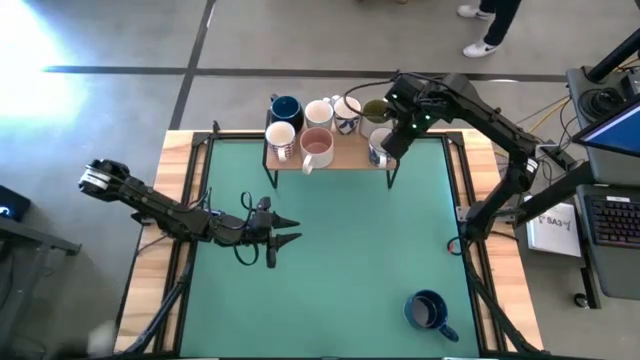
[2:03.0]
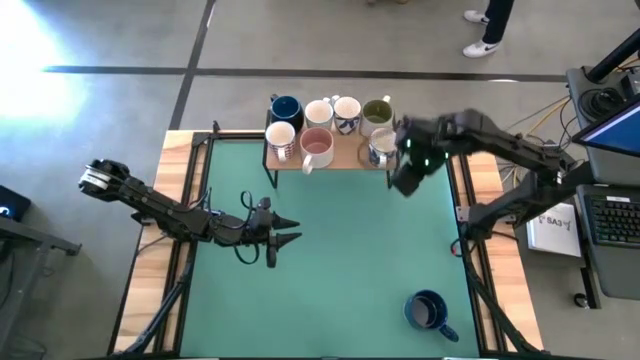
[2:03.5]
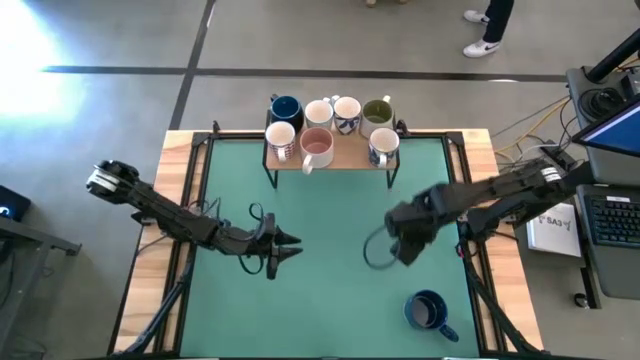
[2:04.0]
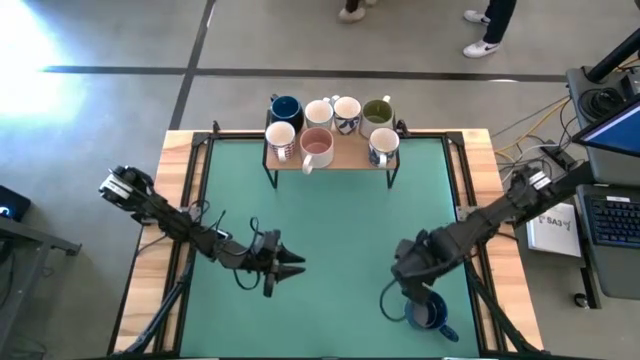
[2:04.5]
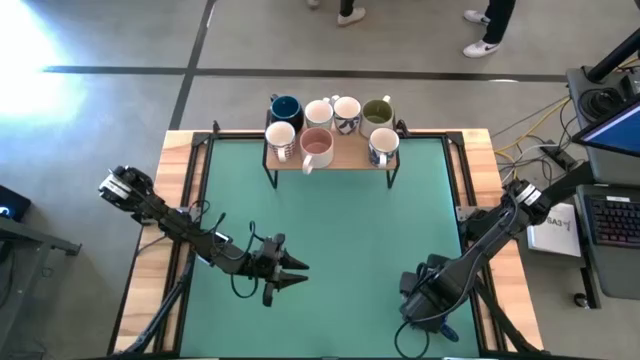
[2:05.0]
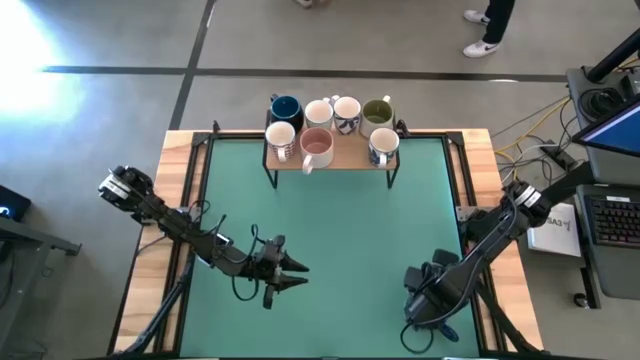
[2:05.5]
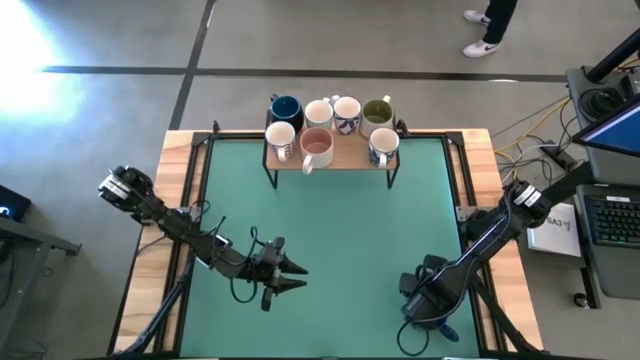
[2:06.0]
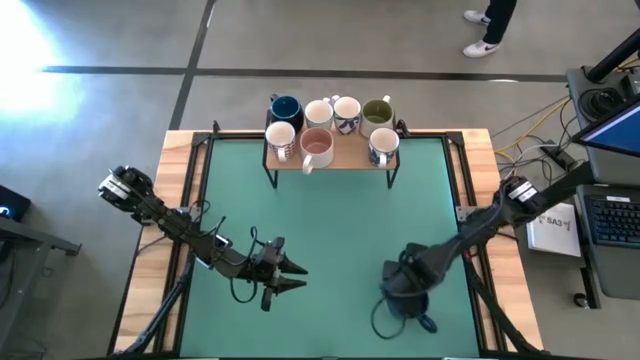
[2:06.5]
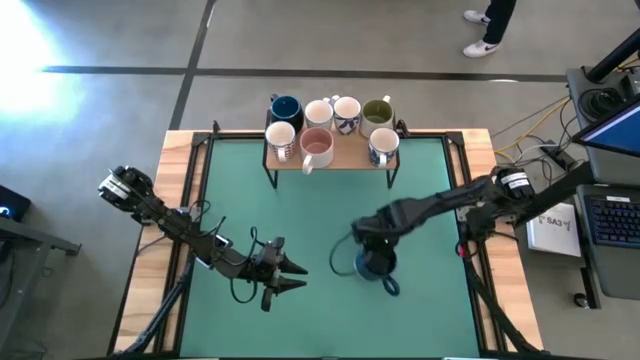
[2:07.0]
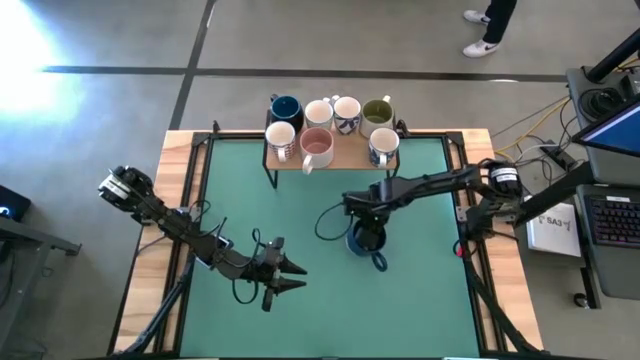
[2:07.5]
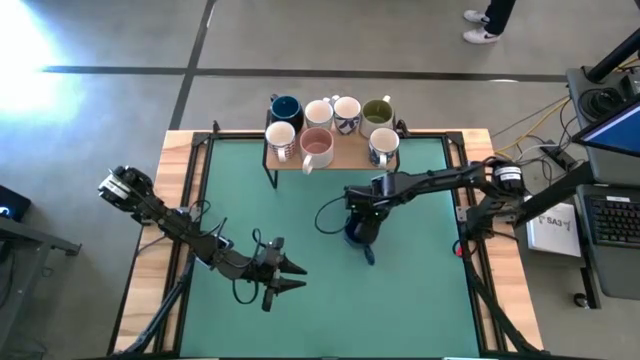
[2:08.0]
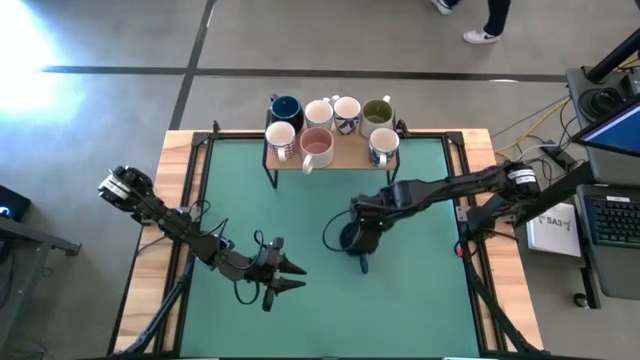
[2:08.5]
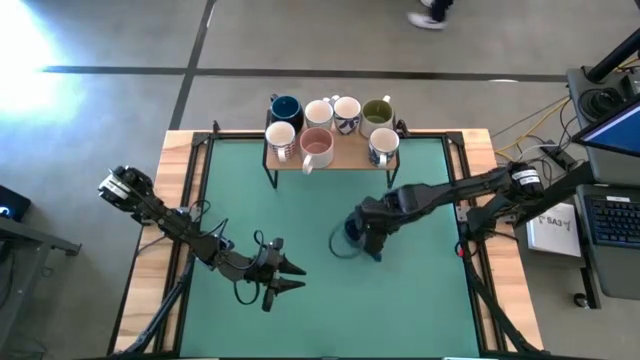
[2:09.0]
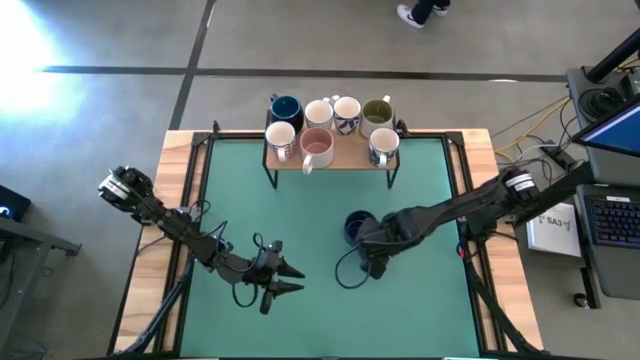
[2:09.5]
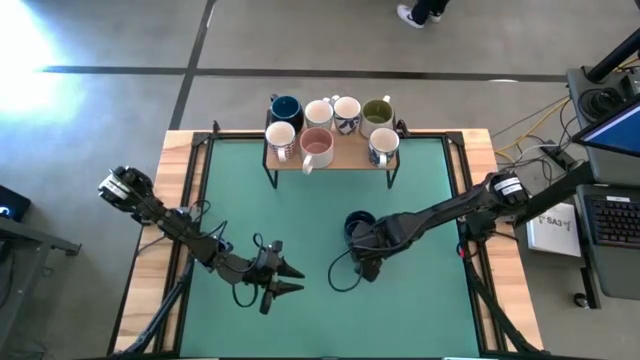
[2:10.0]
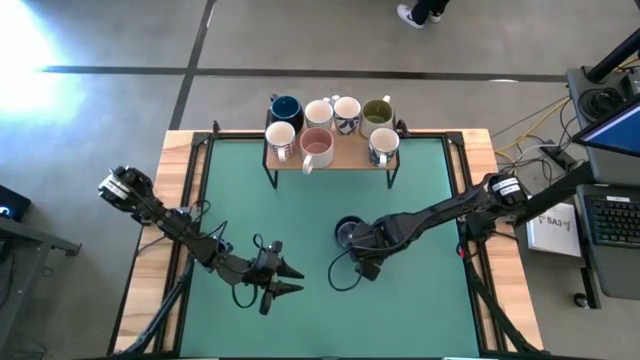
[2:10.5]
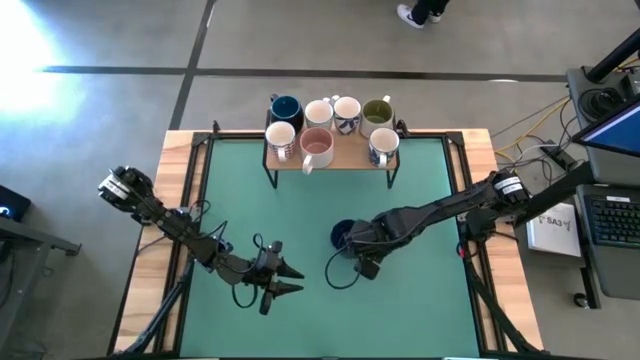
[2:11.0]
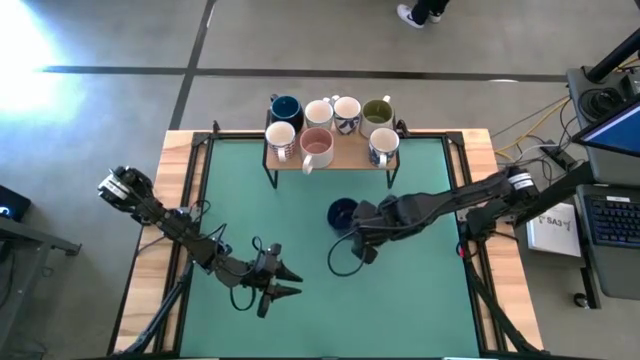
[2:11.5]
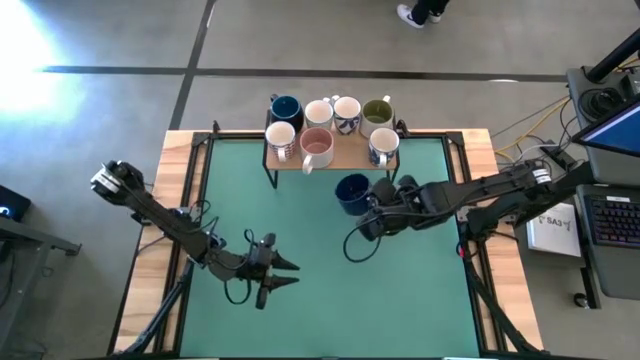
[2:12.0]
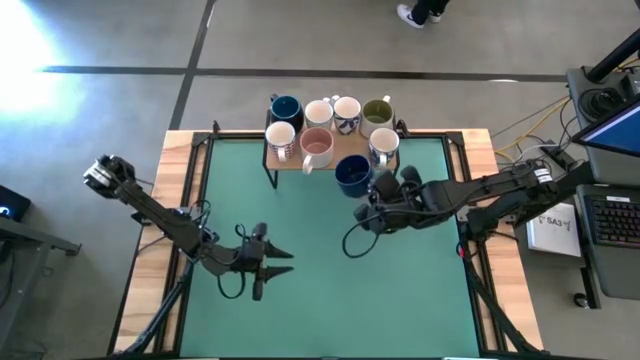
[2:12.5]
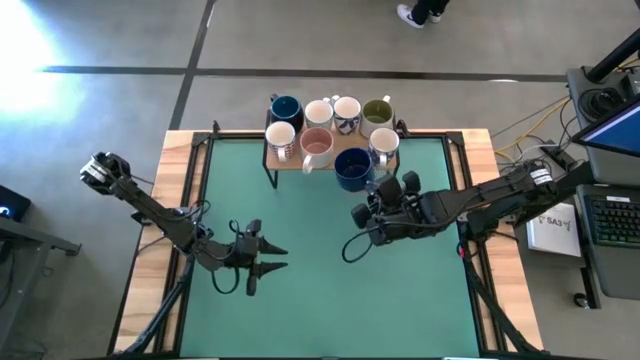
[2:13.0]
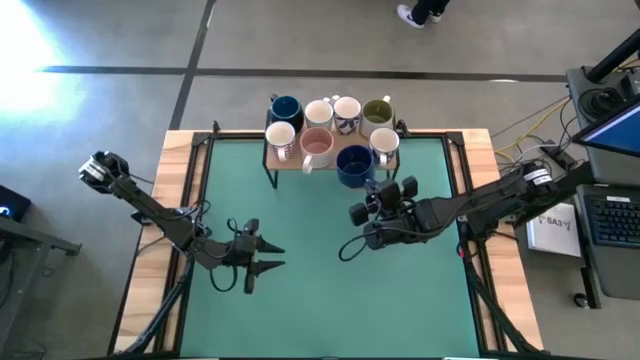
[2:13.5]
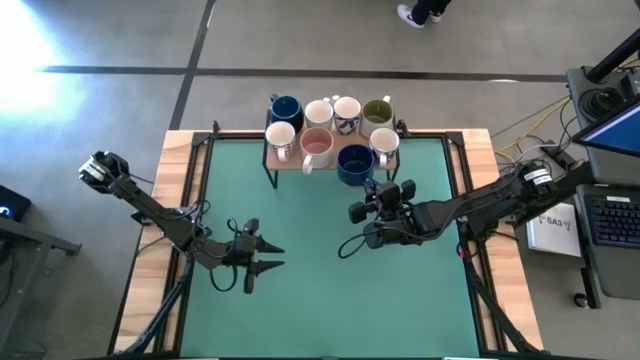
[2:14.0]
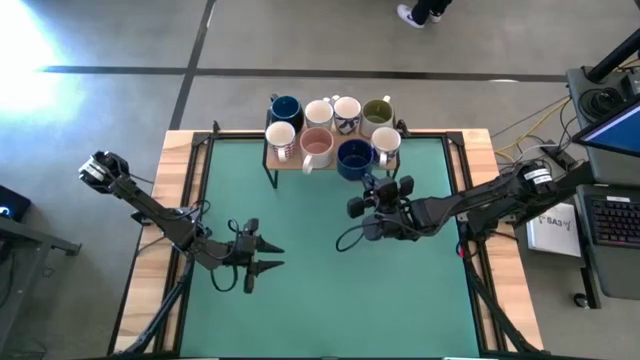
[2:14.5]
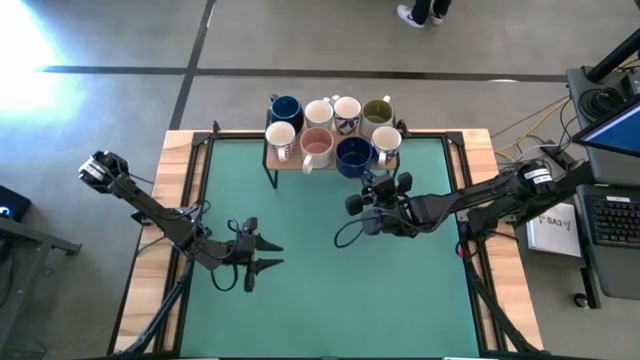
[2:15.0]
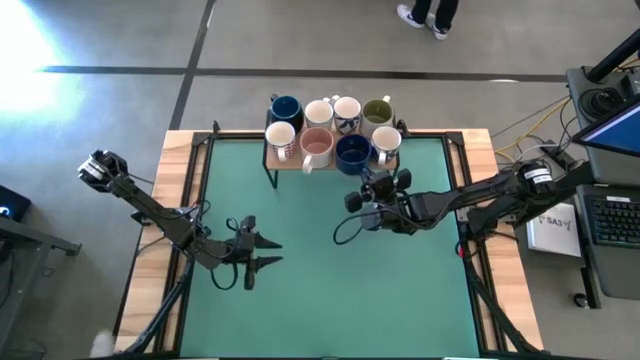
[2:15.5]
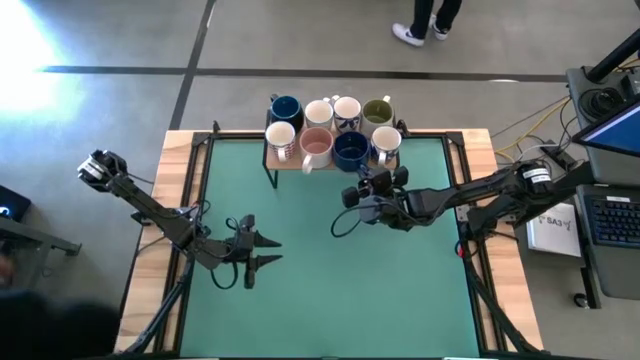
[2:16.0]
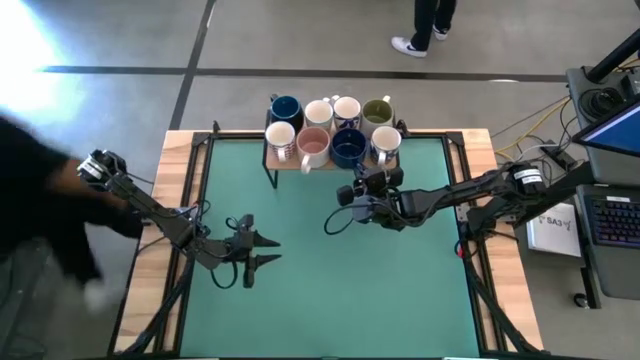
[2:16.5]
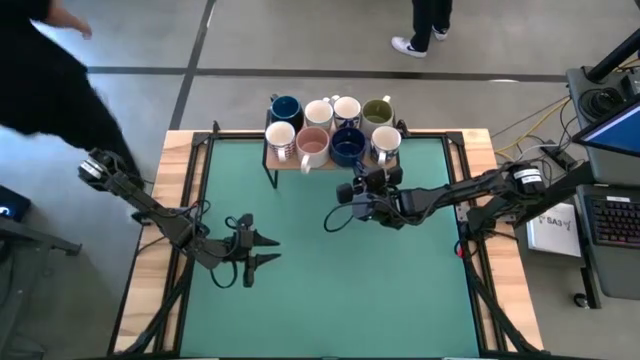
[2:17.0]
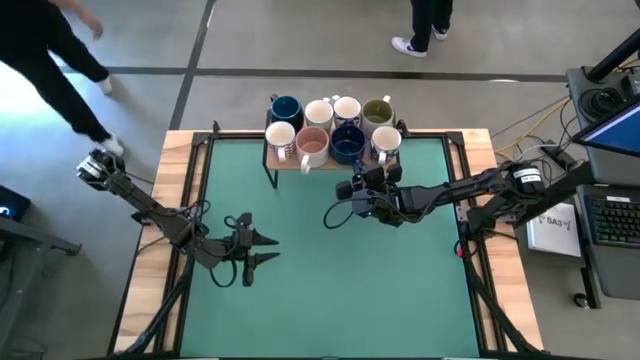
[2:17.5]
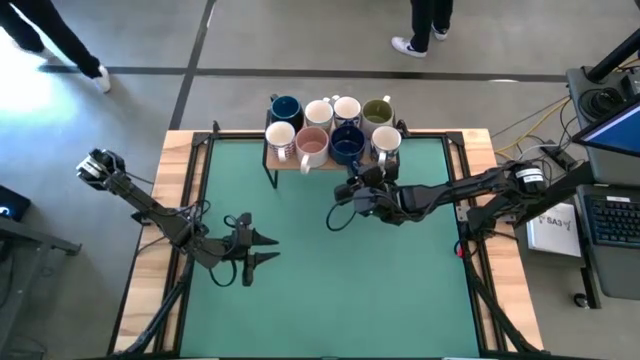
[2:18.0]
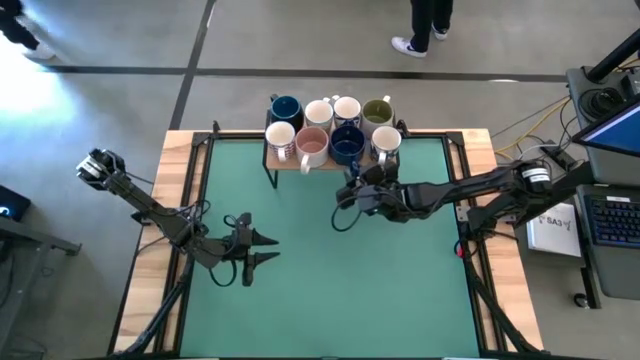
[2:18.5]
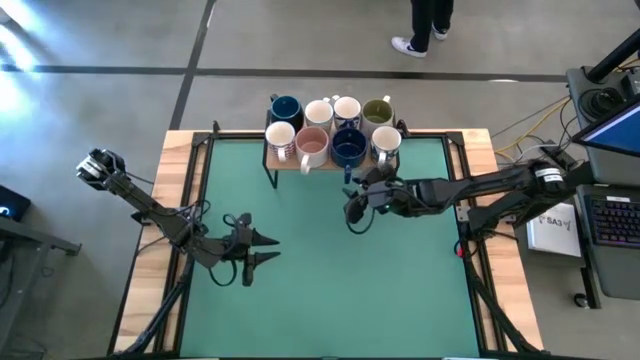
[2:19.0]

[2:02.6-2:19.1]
Task: Place coffee mugs
Put the blue mug on the shelf
